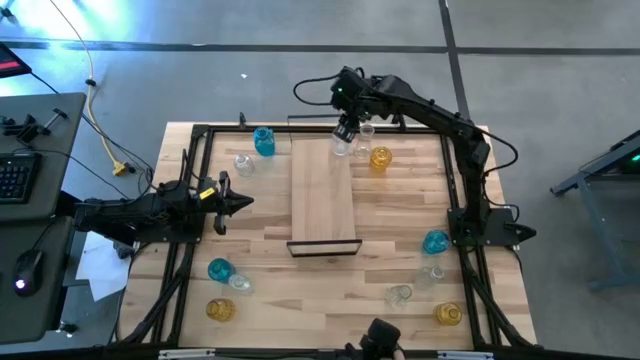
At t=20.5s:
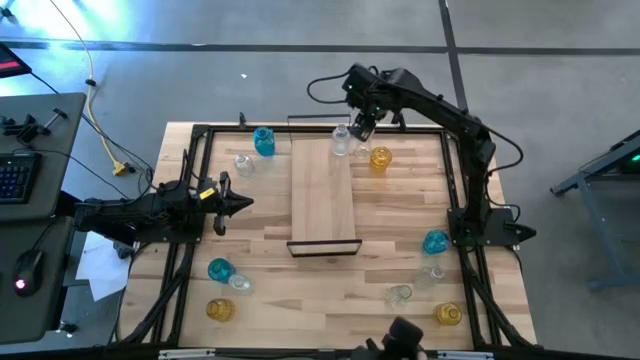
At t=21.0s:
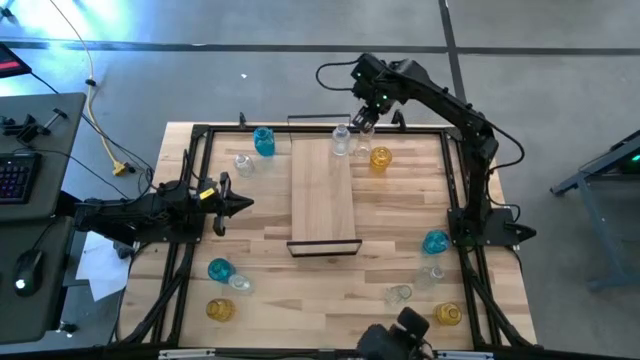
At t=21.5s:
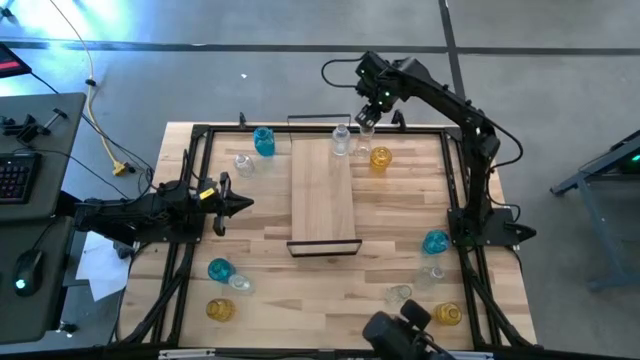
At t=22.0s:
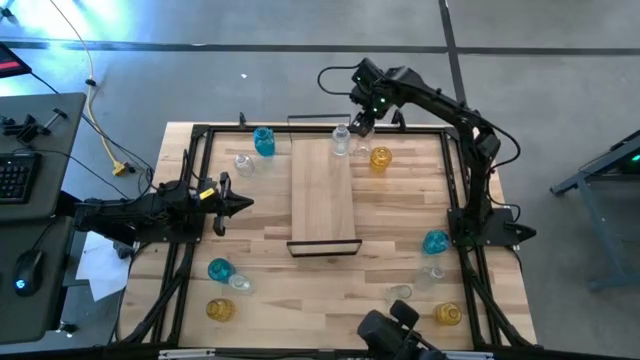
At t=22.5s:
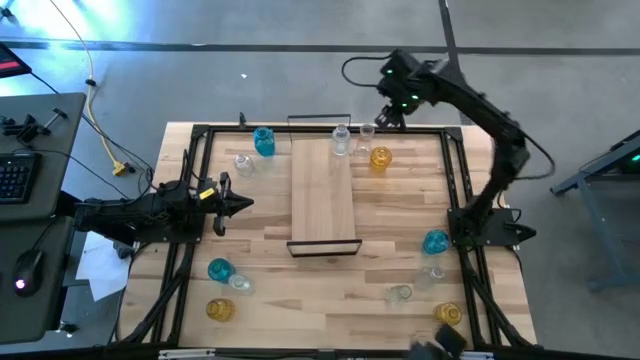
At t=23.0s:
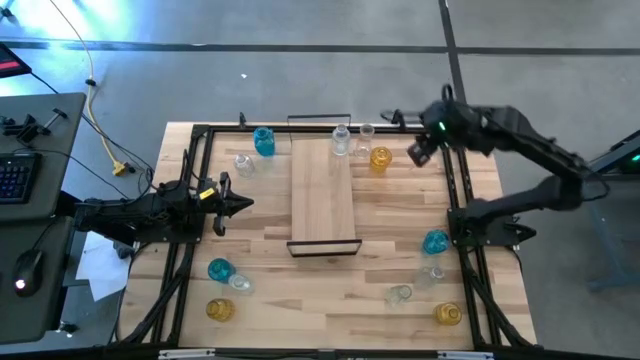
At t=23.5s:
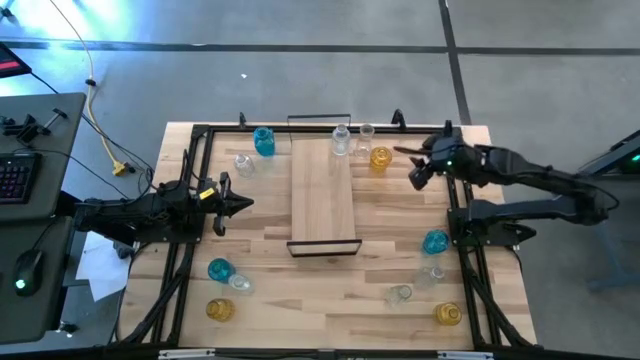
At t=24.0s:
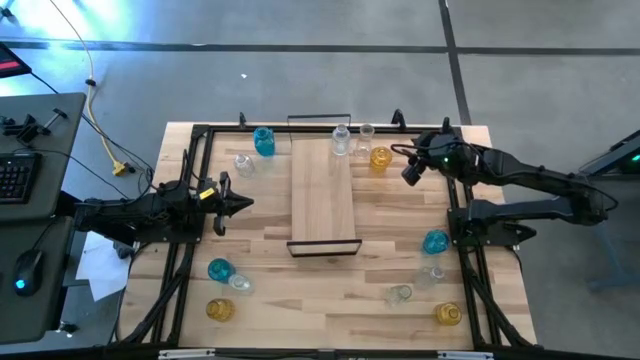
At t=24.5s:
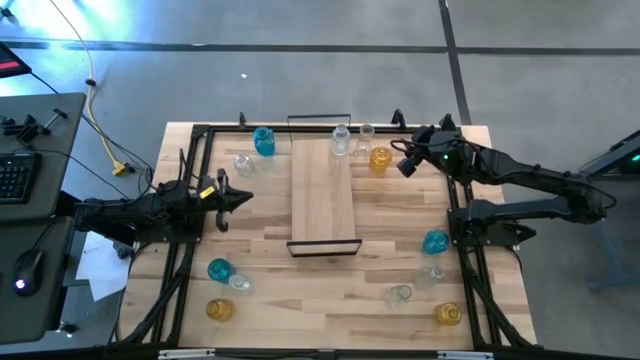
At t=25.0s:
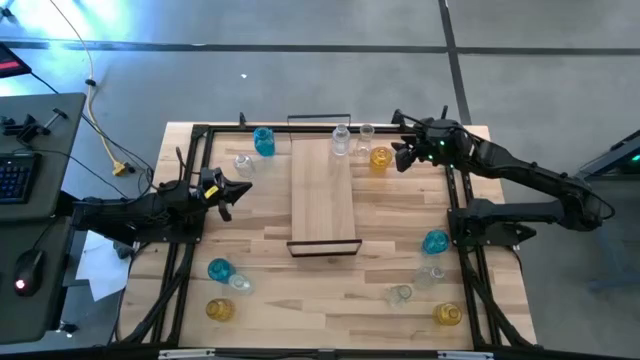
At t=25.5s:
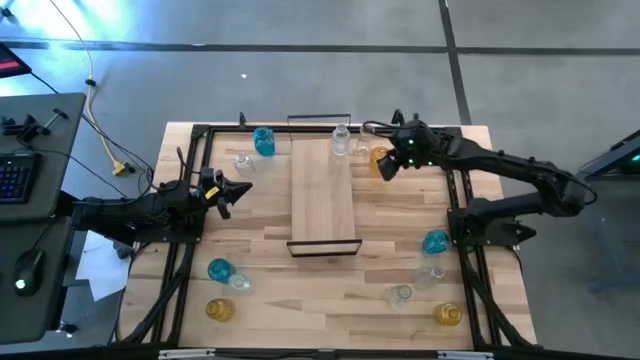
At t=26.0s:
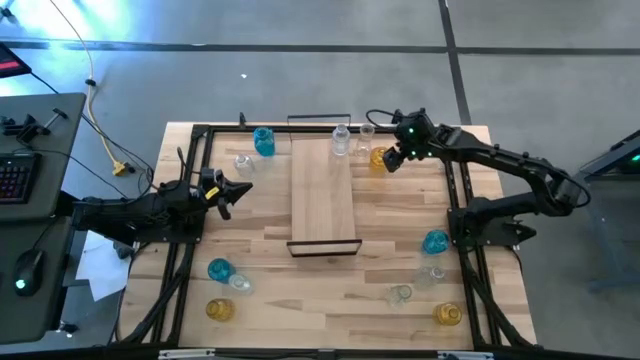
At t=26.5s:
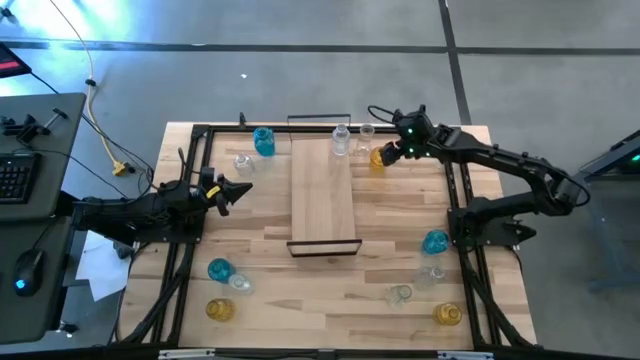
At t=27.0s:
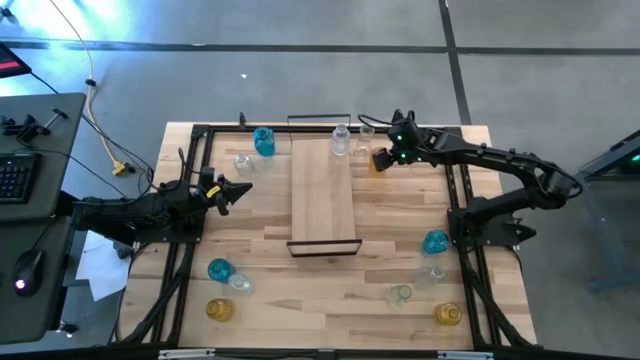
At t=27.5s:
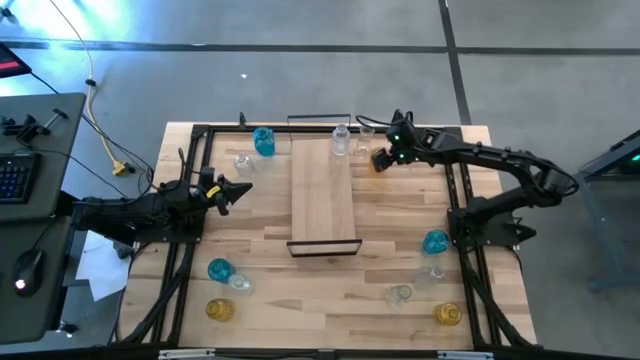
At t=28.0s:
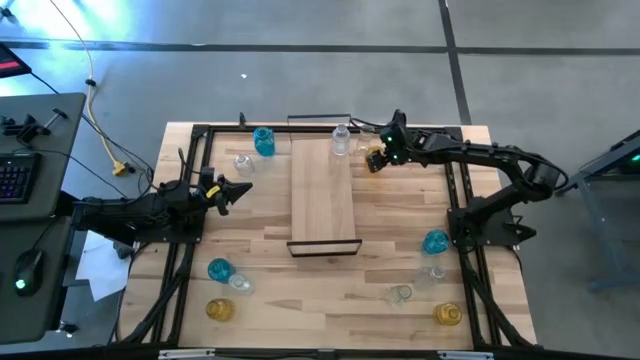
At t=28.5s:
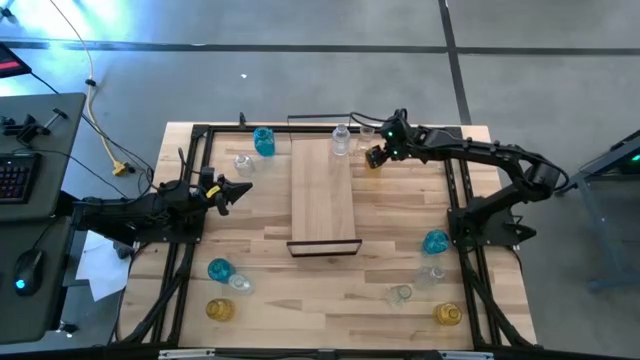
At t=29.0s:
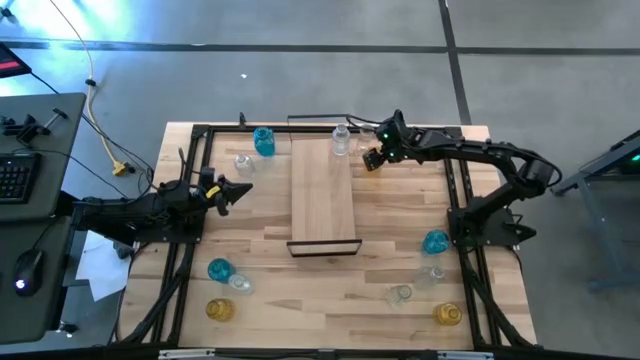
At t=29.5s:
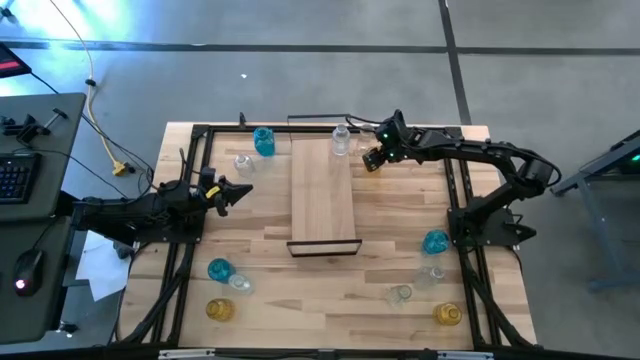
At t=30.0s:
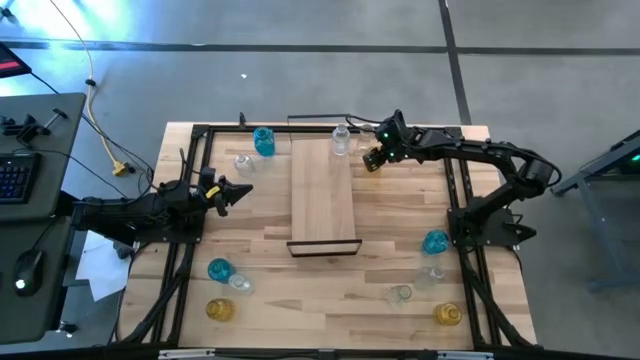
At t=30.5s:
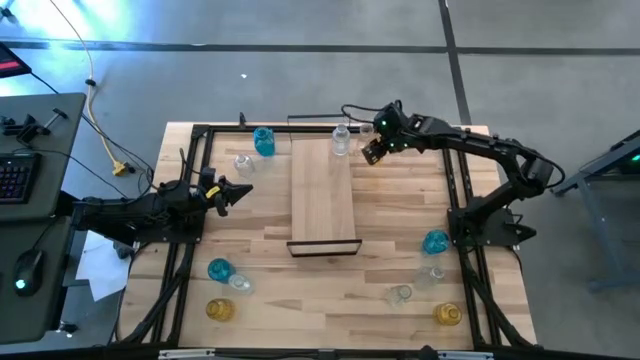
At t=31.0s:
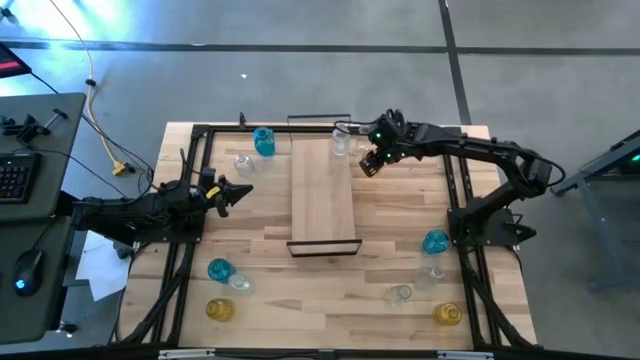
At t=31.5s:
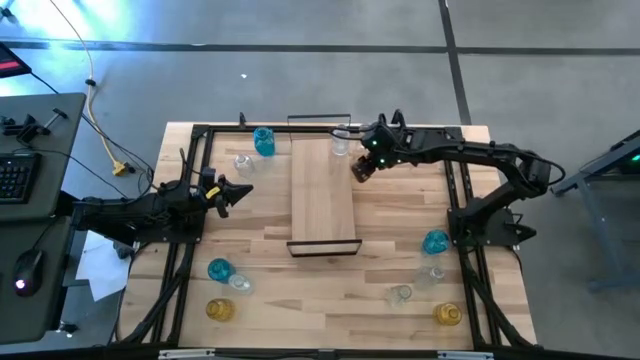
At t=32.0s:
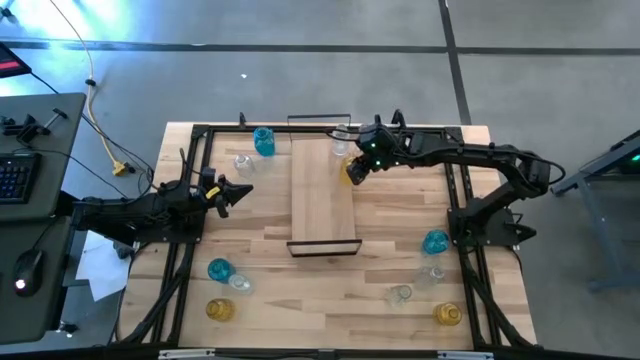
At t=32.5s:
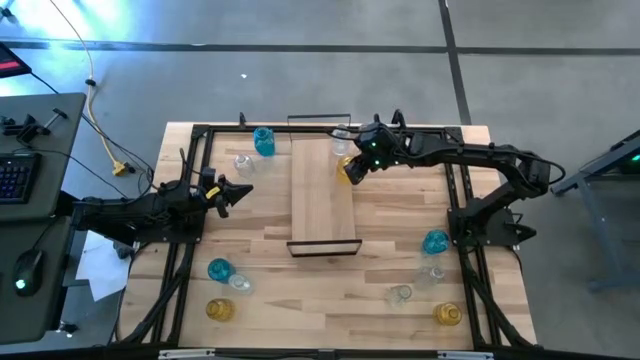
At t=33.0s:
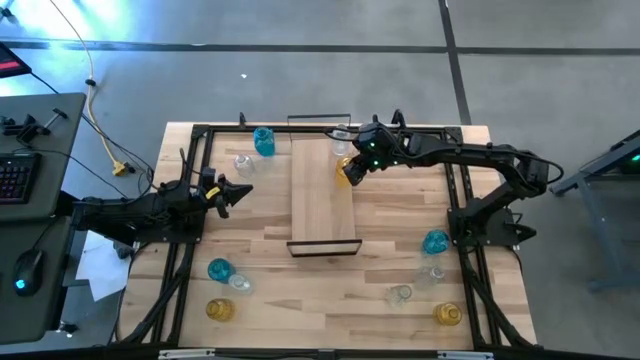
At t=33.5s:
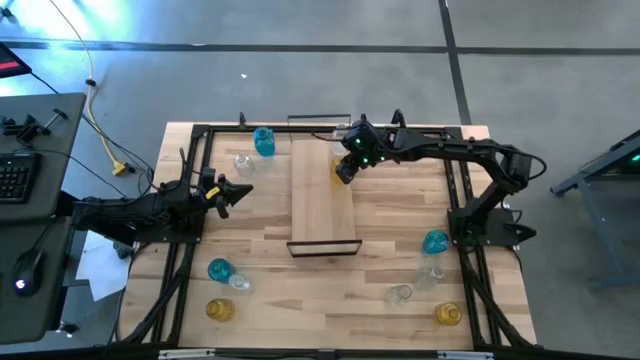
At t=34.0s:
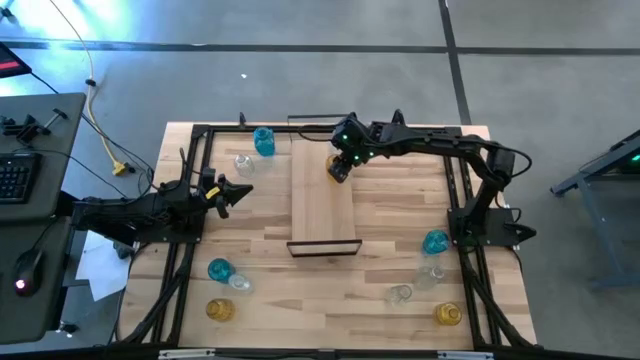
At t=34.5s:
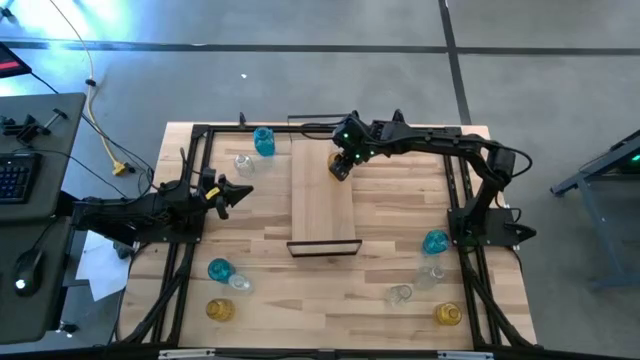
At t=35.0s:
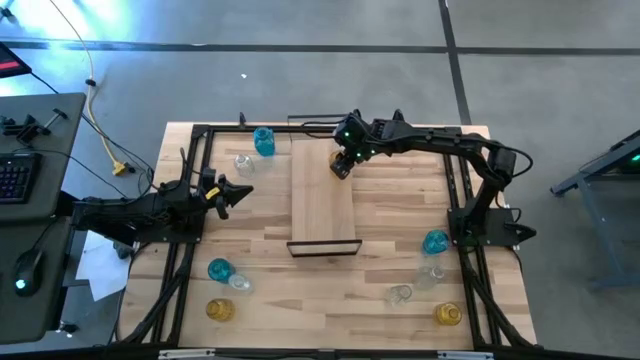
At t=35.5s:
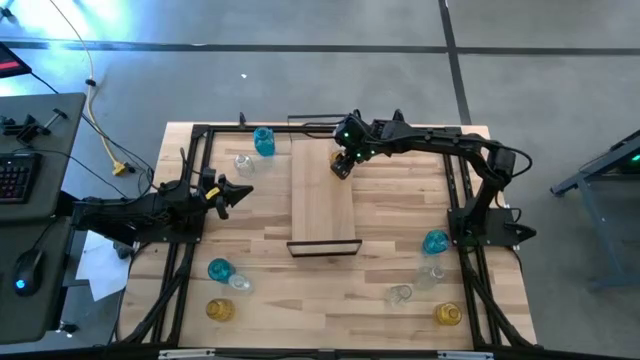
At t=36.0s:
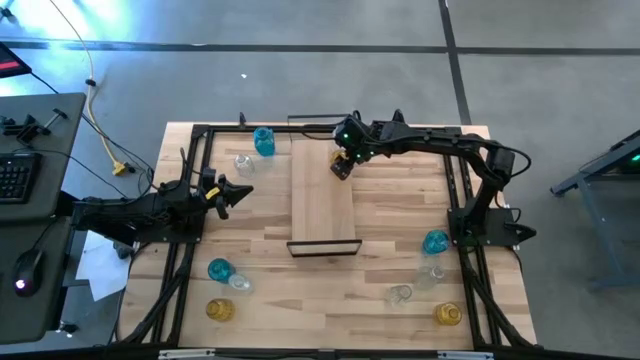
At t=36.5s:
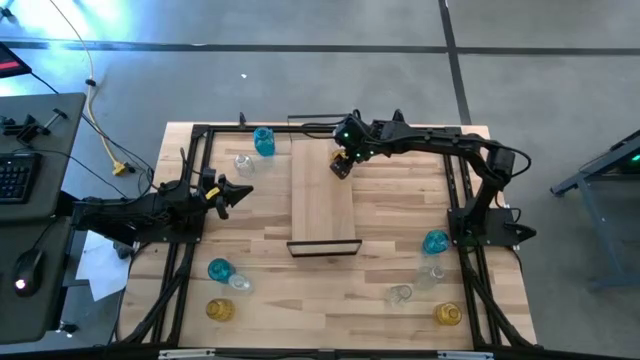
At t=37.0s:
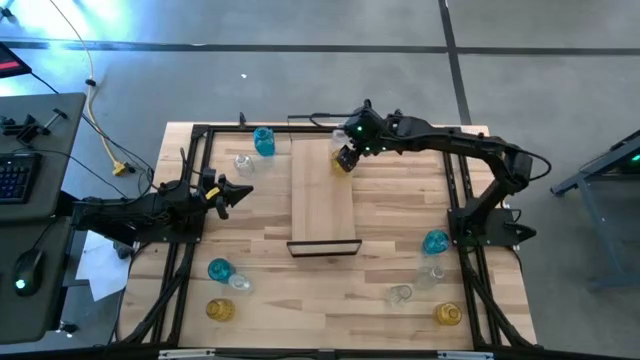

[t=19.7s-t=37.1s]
Task: sort vases onto shelf
Put the top yellow flower vase on the shelf

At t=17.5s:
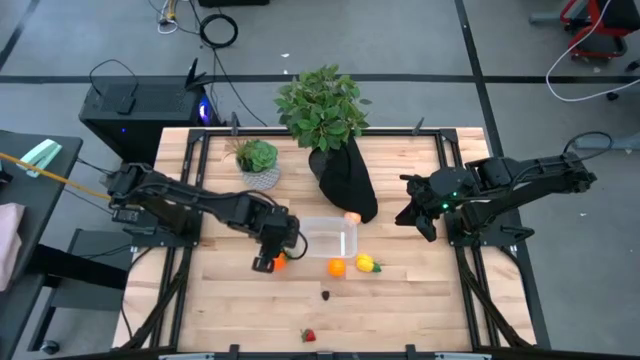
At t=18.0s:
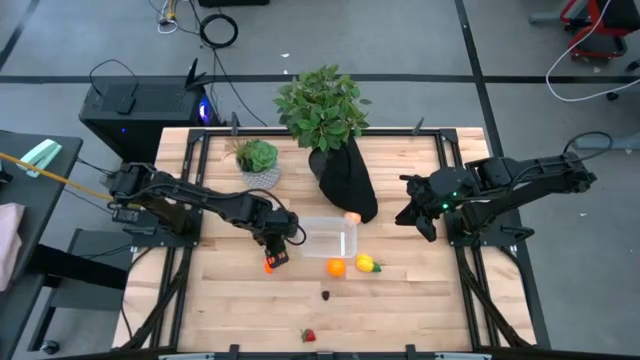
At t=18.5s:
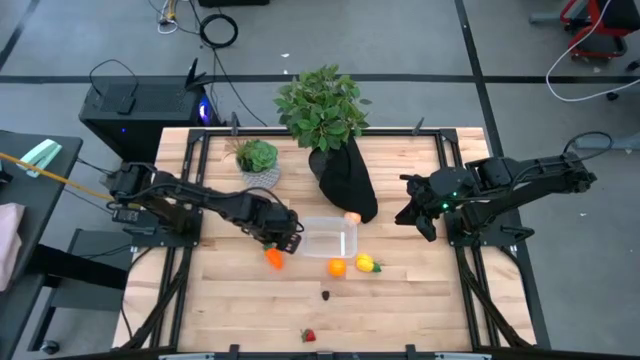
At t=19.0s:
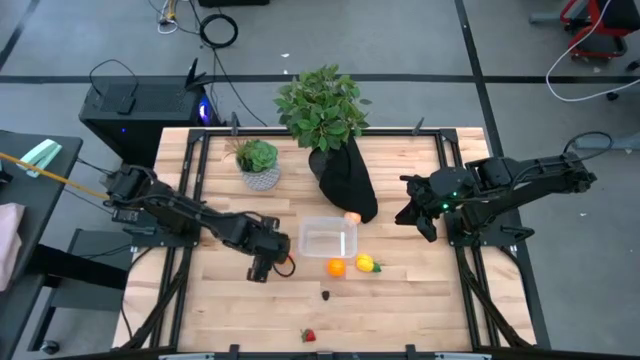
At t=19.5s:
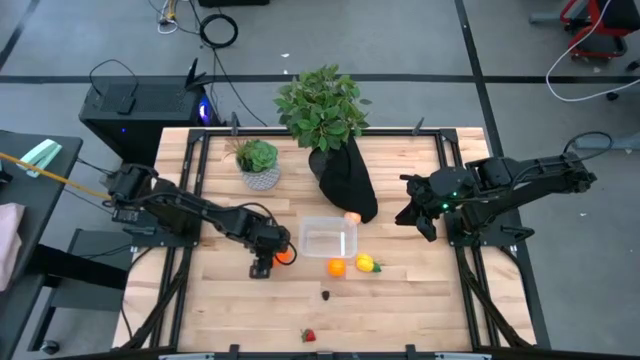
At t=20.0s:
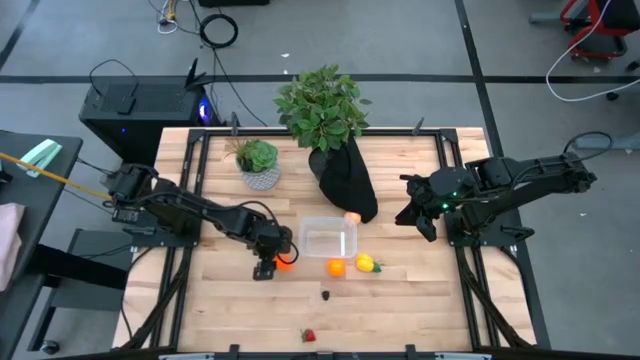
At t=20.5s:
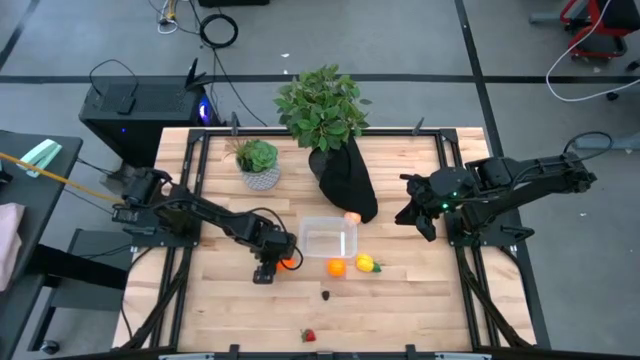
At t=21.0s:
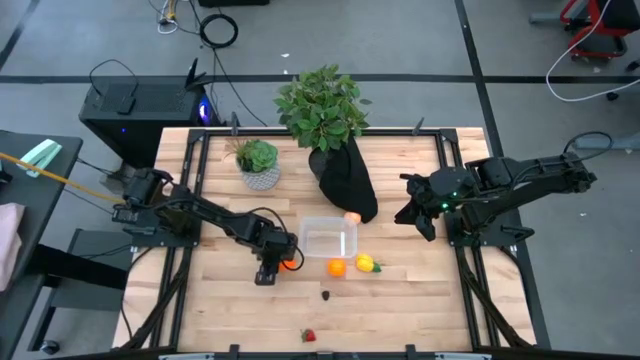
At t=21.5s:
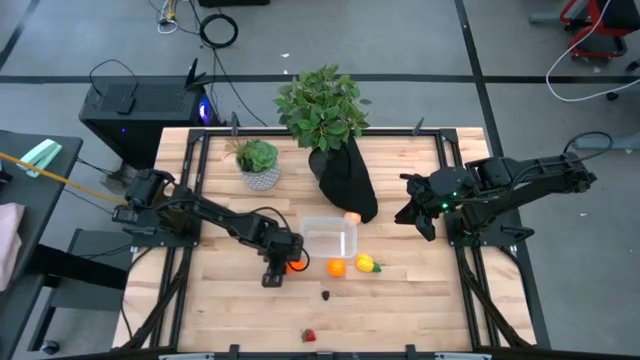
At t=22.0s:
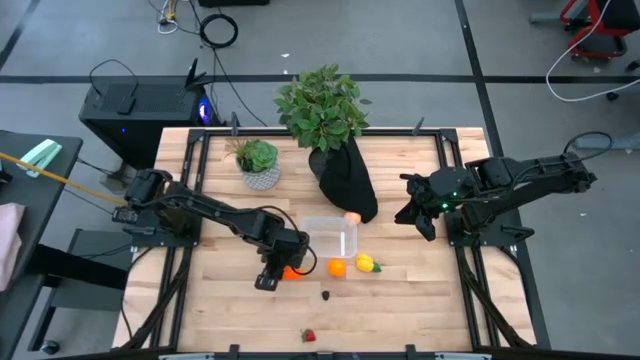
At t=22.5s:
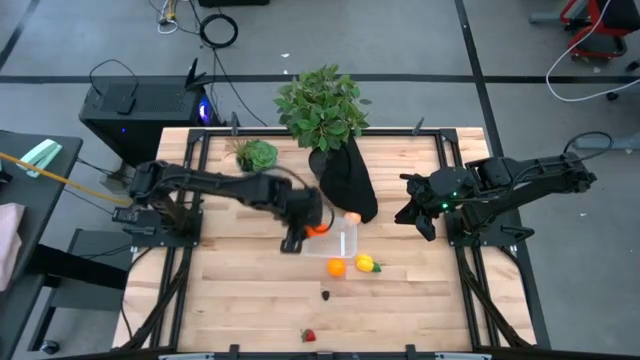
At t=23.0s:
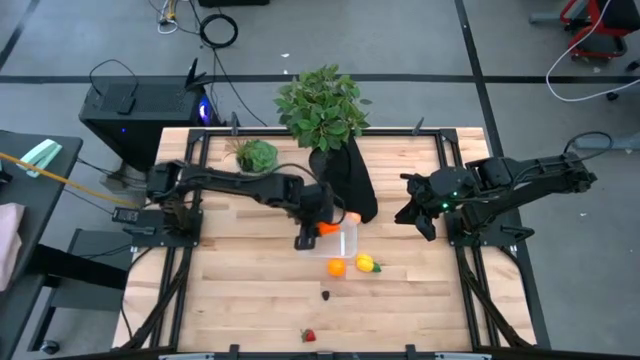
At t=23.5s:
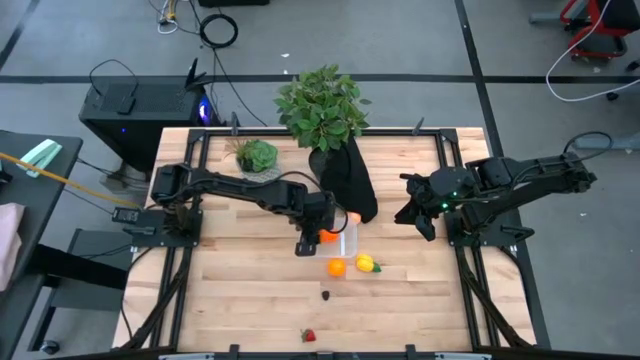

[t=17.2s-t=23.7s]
Task: Pick and placing Produce into tupperware
Put the orange carrot into the transparent bin
